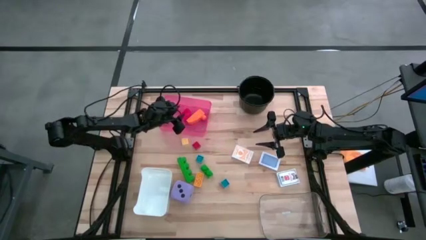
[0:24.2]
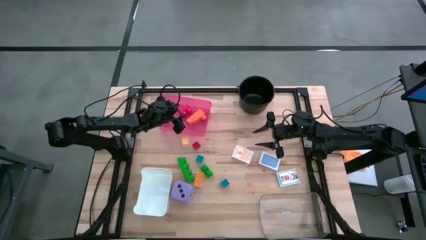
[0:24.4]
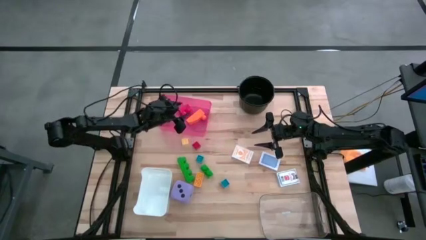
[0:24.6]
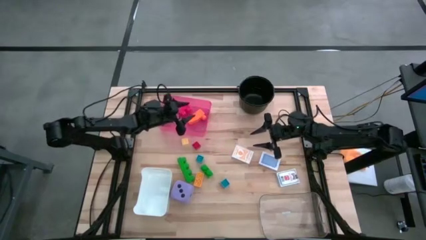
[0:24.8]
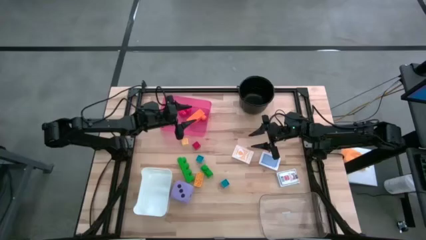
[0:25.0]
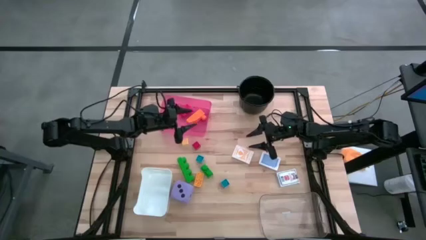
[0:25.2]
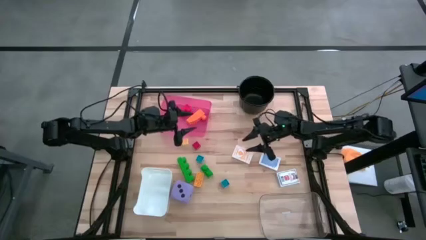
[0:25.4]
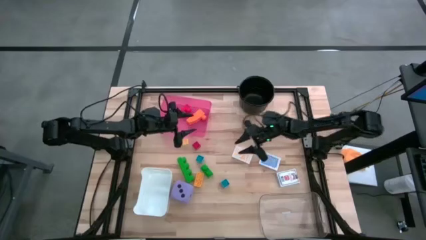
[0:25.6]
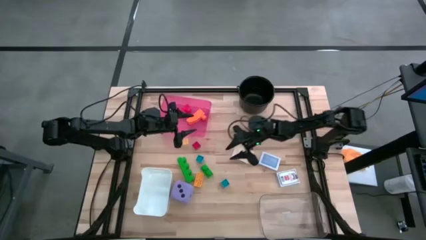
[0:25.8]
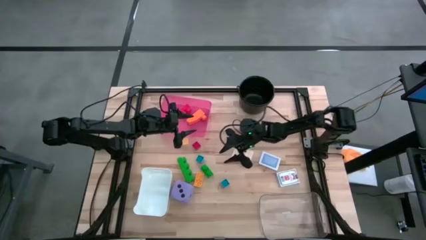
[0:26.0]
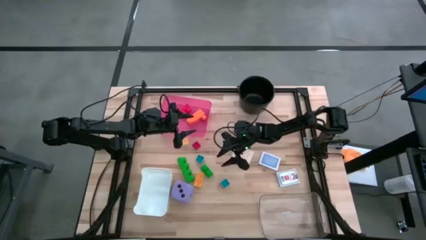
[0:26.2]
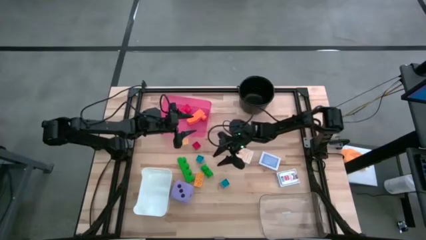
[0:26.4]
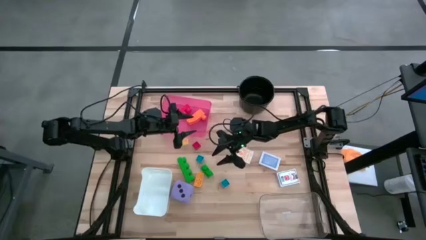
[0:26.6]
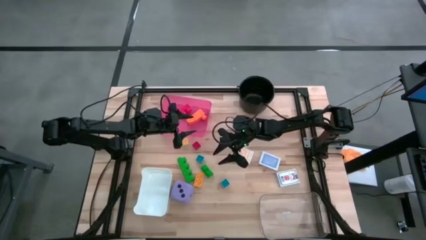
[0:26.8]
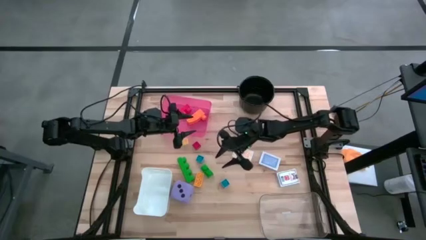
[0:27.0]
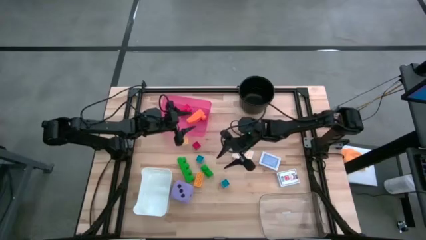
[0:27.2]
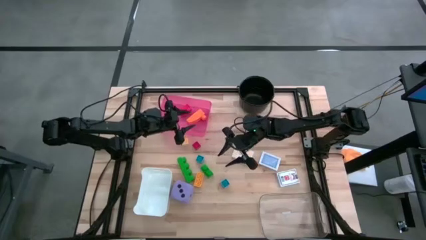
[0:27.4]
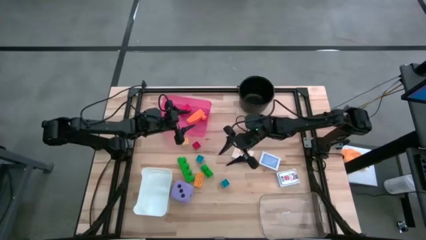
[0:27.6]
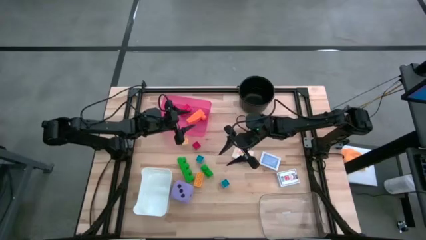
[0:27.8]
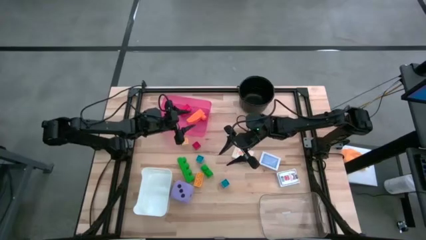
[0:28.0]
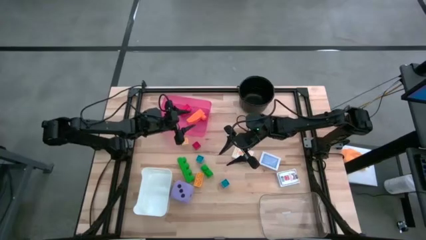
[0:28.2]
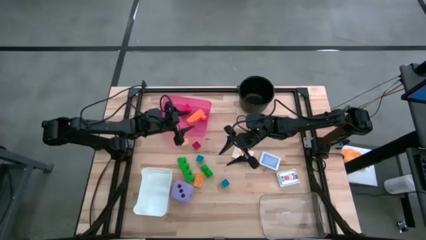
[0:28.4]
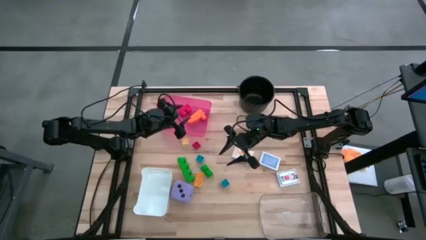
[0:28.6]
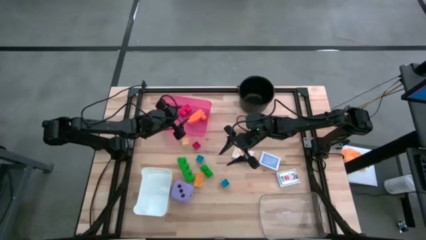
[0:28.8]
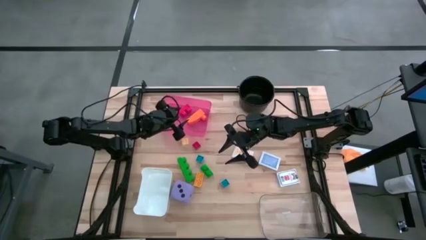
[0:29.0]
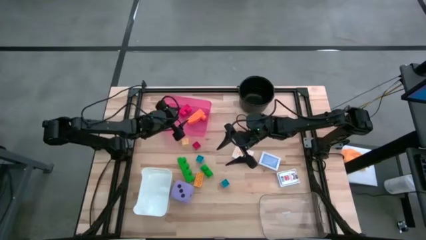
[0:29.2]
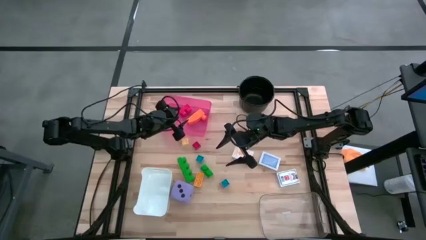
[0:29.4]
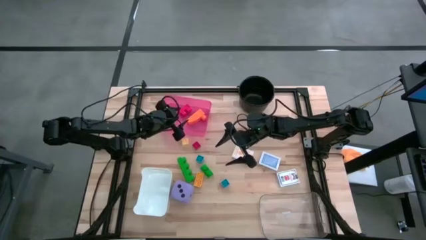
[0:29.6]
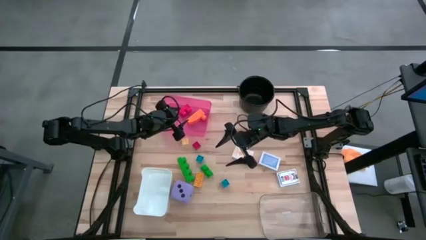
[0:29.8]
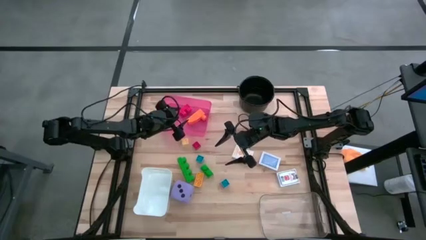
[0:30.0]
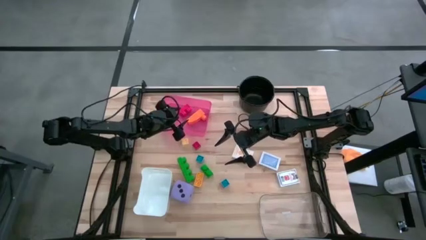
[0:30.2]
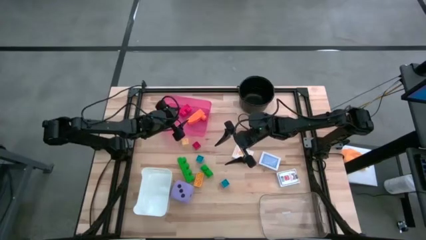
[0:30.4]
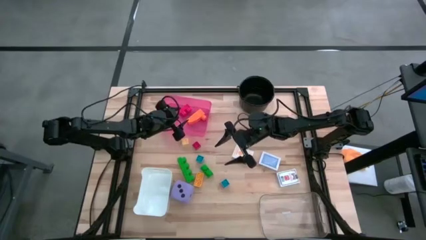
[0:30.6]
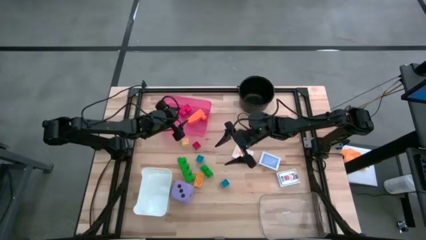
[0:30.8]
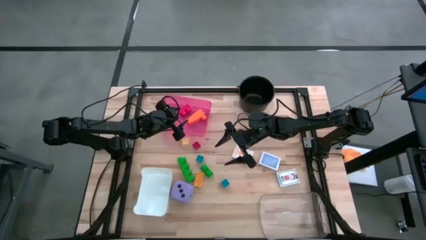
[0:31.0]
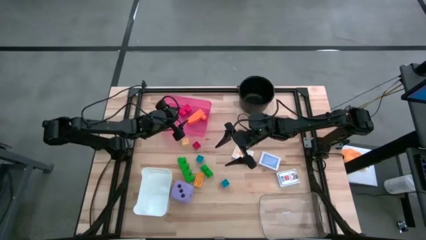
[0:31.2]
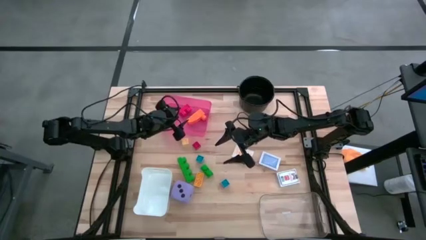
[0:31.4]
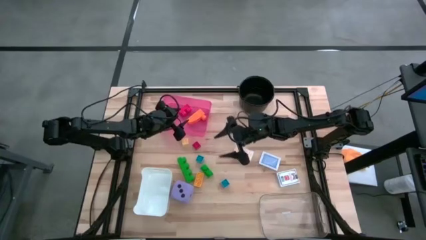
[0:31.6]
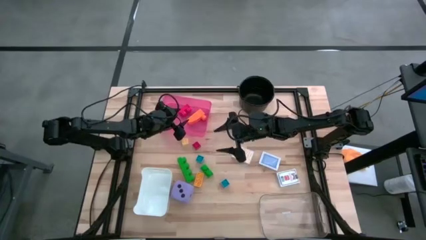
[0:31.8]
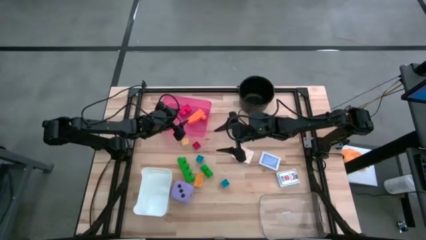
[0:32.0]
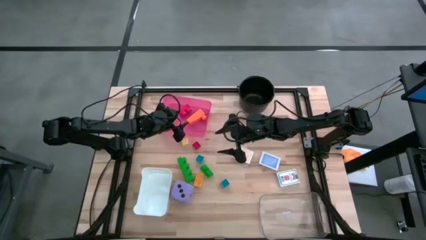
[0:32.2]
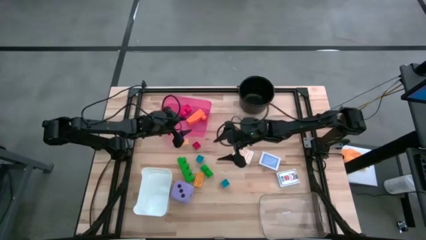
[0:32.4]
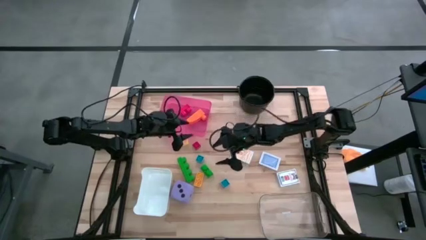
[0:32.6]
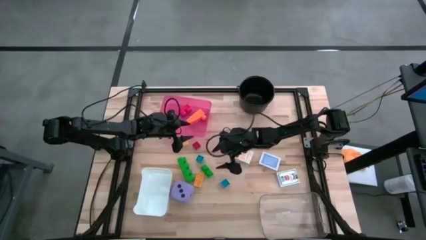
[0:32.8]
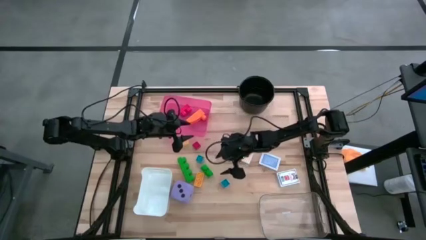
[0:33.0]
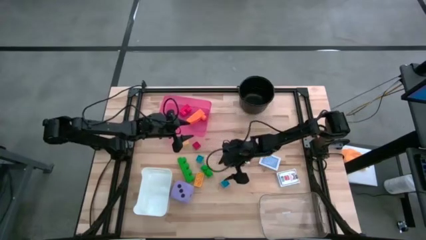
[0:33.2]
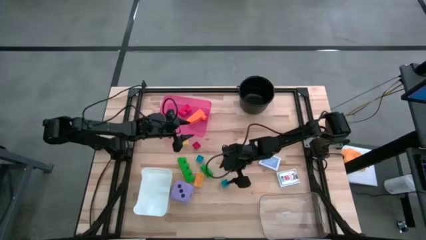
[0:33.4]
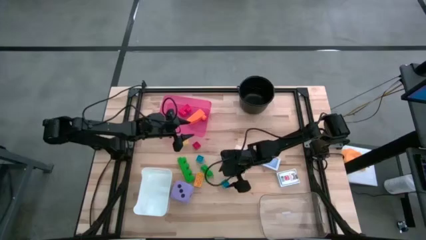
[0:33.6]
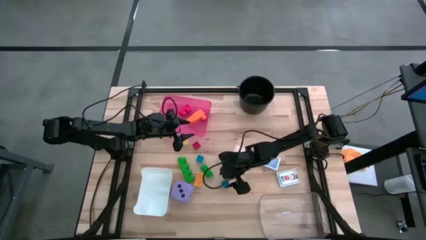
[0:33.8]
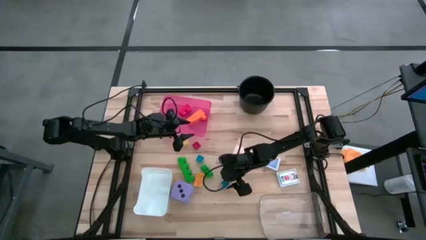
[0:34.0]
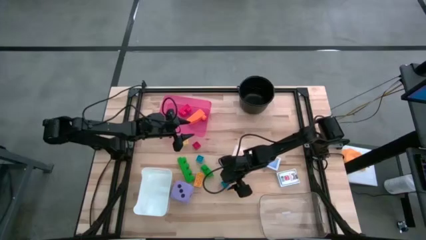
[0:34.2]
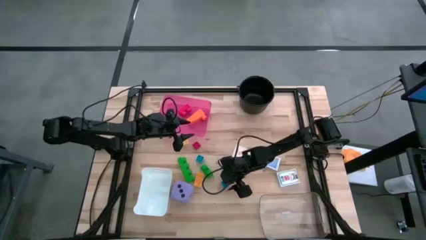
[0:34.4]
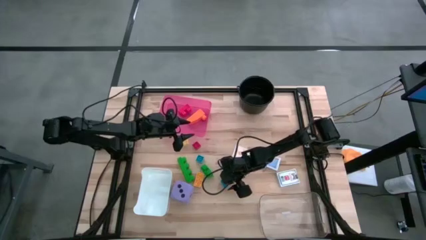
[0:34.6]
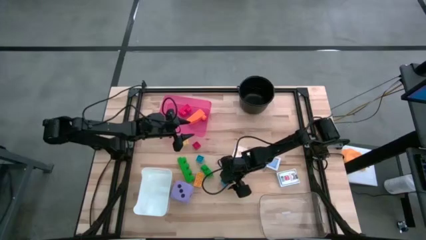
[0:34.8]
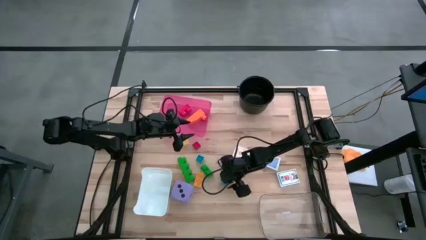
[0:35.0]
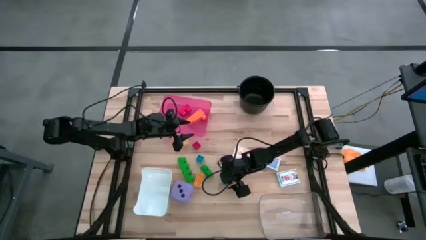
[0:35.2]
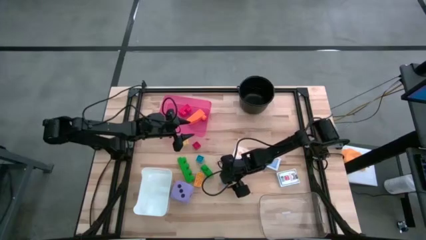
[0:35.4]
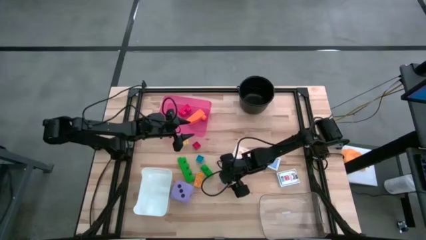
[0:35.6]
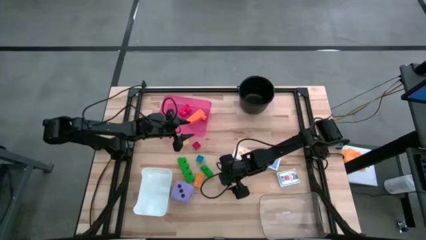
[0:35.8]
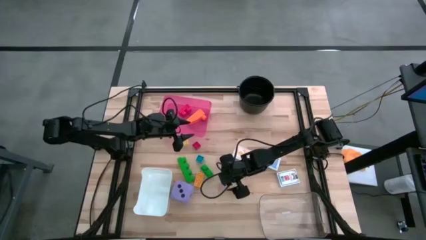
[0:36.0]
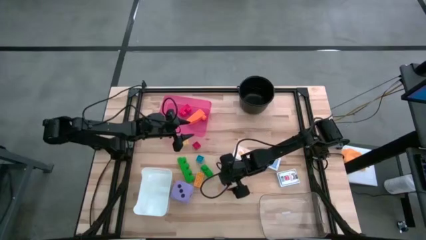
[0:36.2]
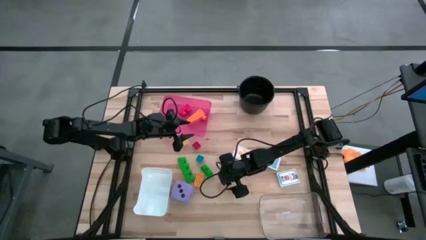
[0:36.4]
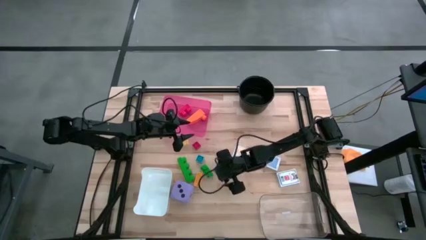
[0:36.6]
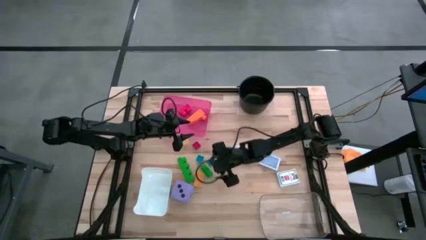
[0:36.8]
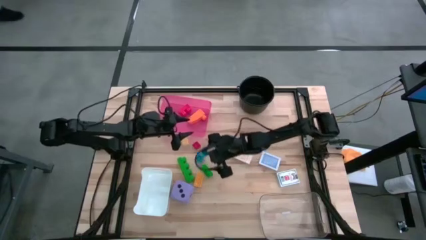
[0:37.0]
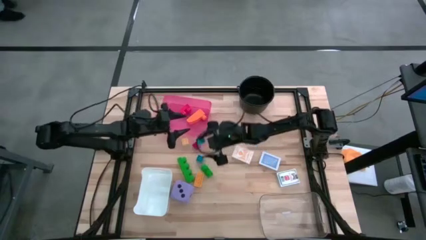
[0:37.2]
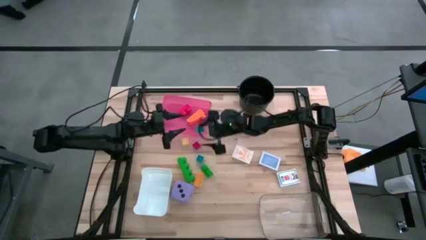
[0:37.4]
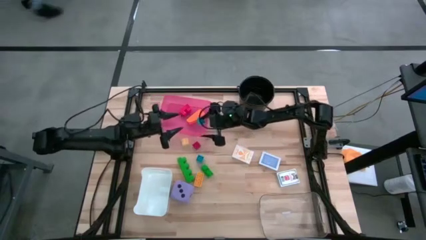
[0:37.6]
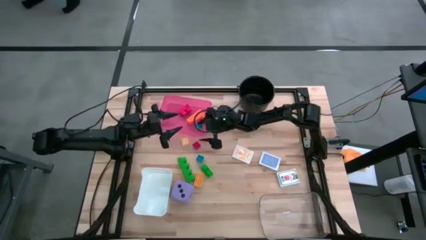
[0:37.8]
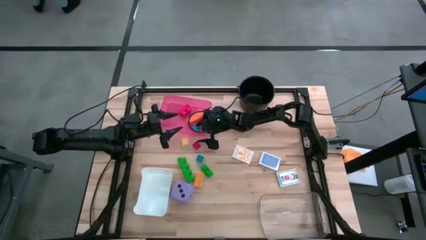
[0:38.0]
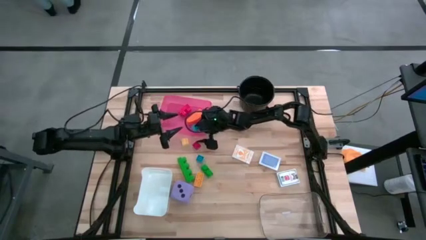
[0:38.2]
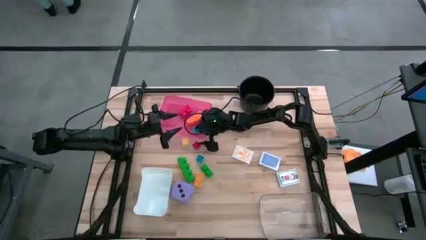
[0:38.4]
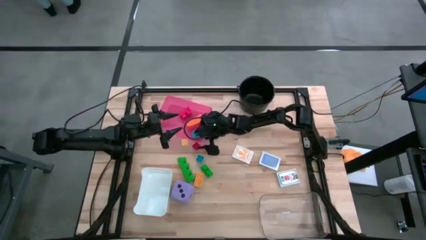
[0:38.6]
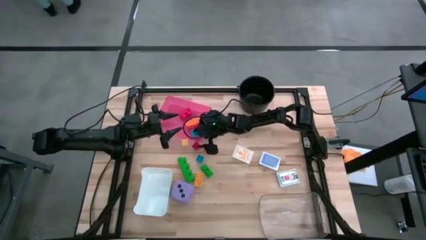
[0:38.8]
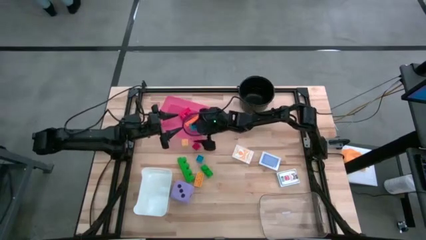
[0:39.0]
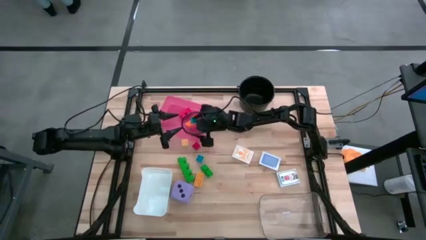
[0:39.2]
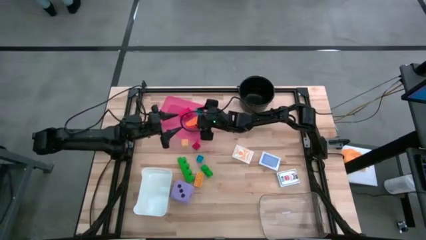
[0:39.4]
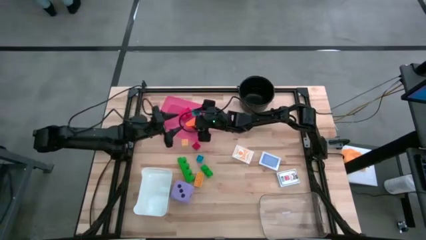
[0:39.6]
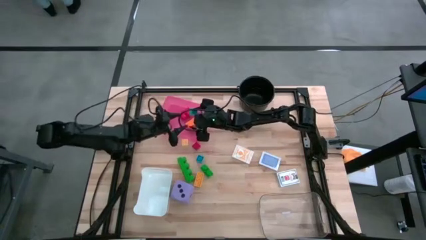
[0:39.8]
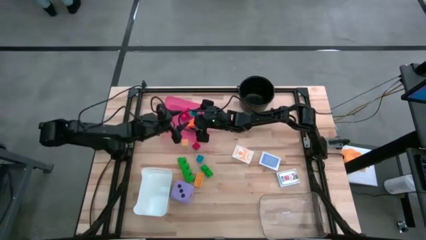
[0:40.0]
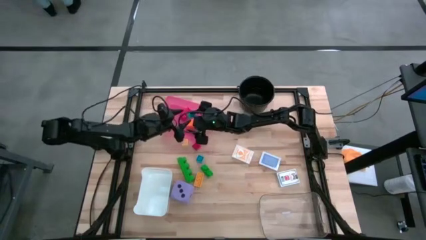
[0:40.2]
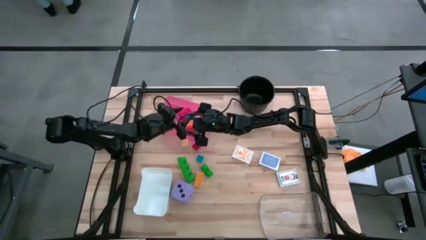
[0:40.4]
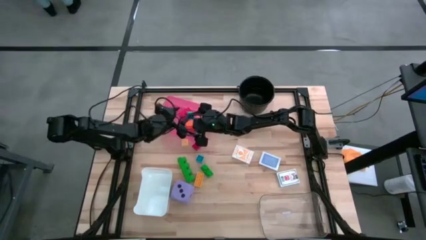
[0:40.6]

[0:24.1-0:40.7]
Task: Pick & Place Toys
Put the bottom blue game piece into the red bin
